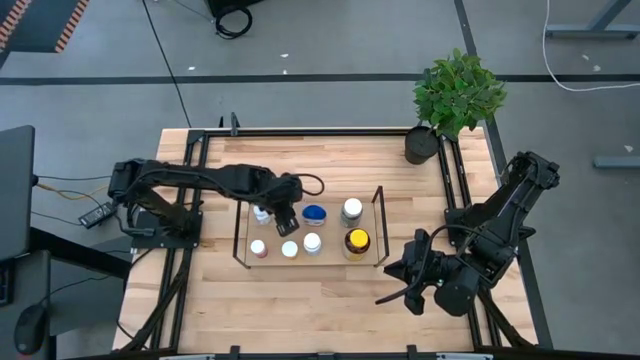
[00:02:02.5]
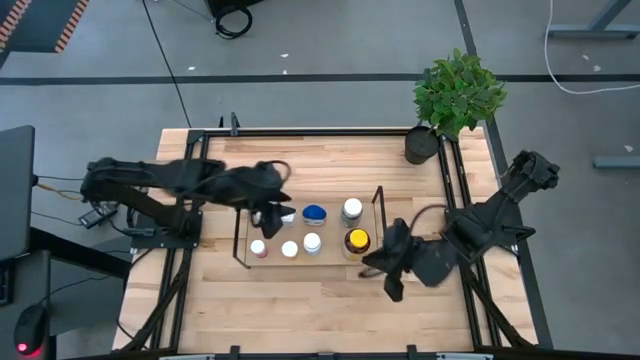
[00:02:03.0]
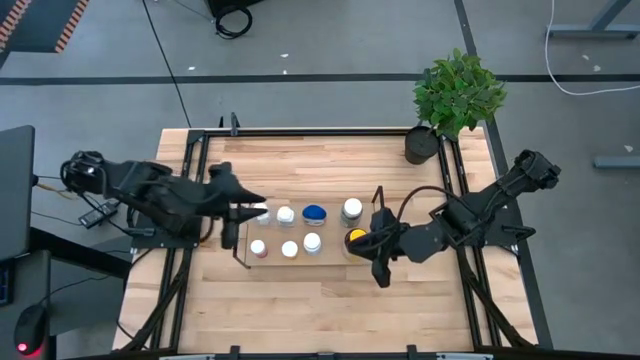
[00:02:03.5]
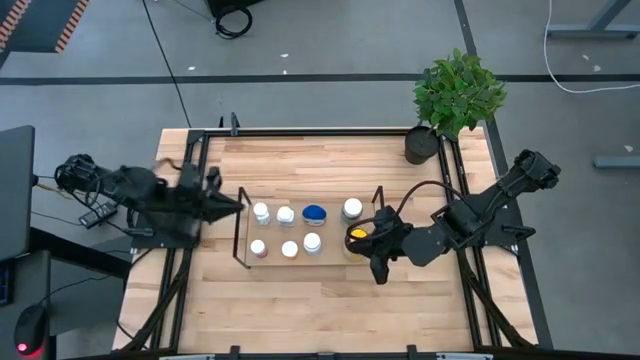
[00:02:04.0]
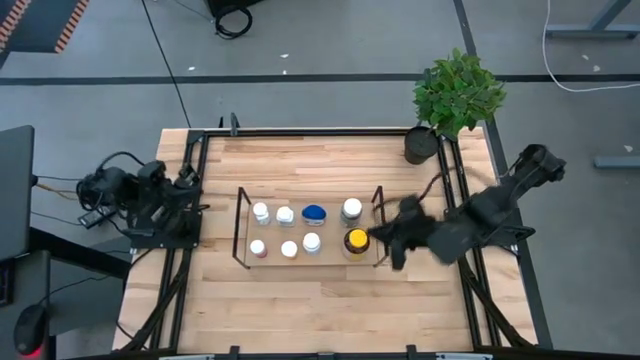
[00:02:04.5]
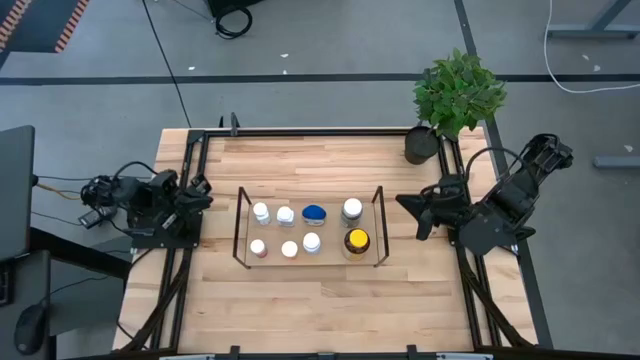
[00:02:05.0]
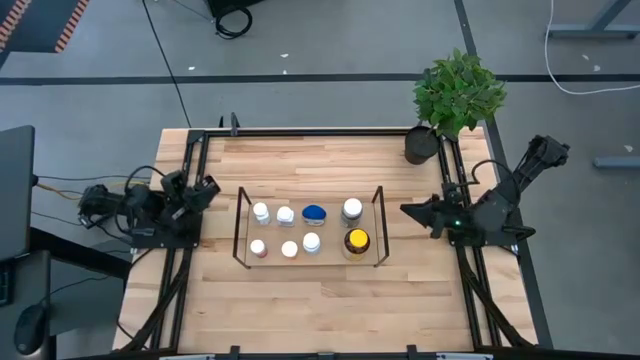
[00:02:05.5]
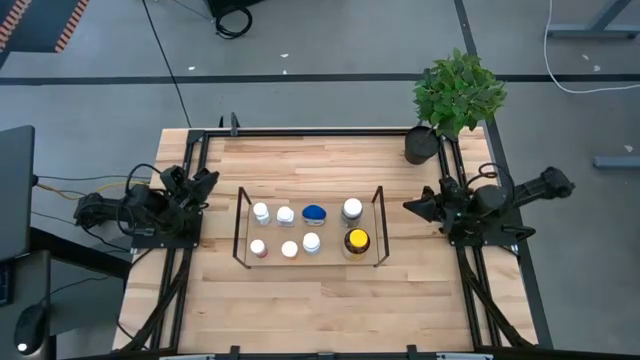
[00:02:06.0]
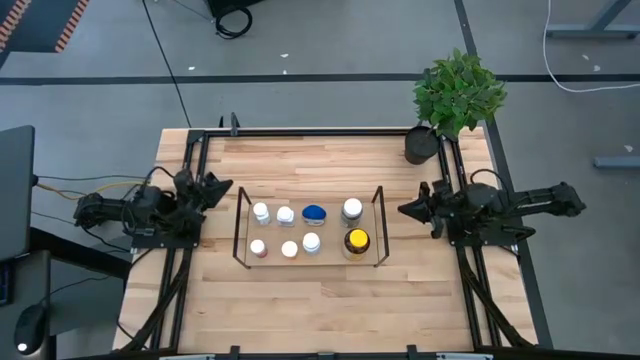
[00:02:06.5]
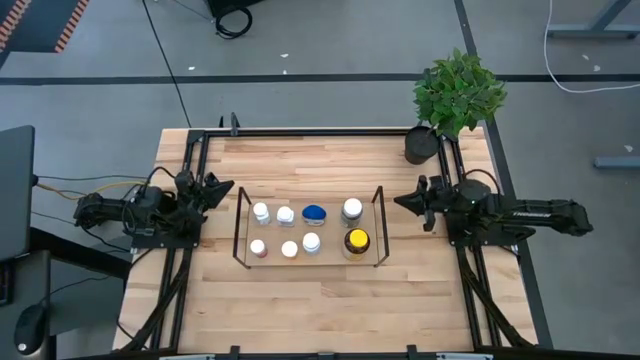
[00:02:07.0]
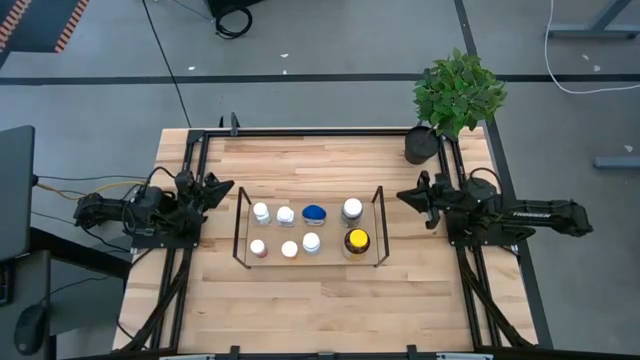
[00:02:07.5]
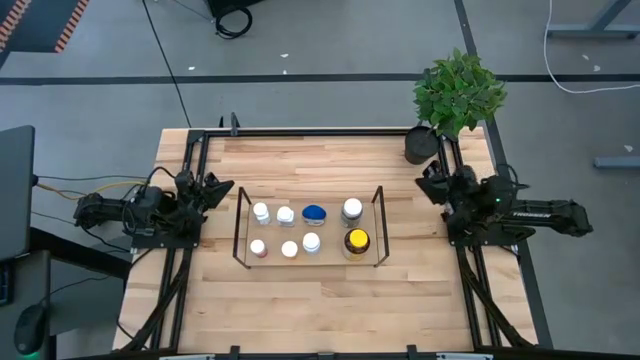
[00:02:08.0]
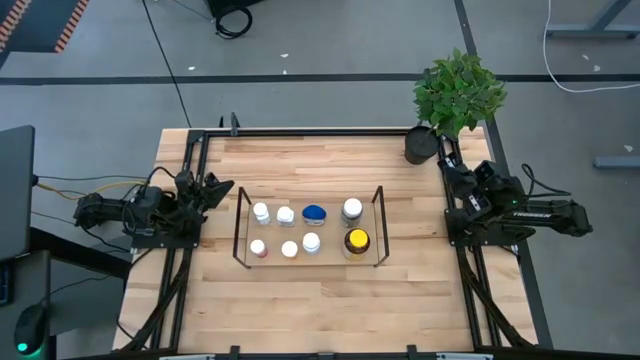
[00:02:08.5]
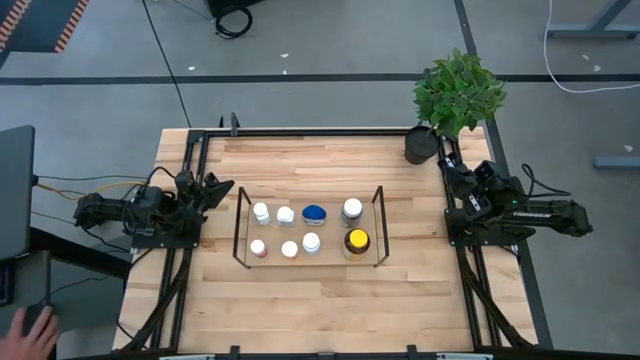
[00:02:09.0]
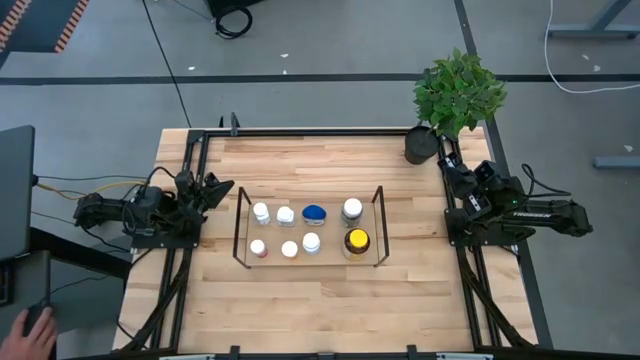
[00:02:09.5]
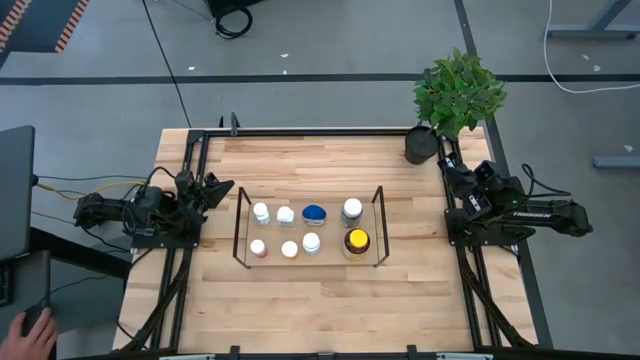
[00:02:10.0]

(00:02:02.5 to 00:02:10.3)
Task: Pick and place medicine bottles onto shelf by color
Return to Home Position

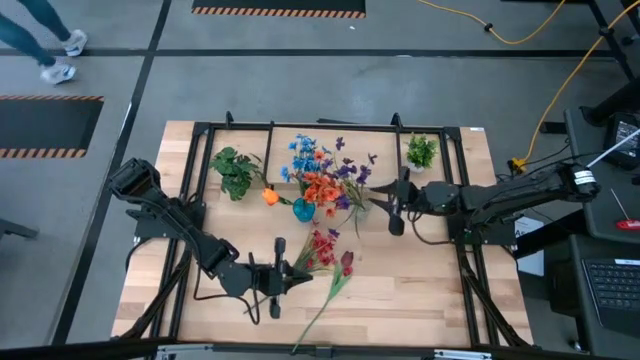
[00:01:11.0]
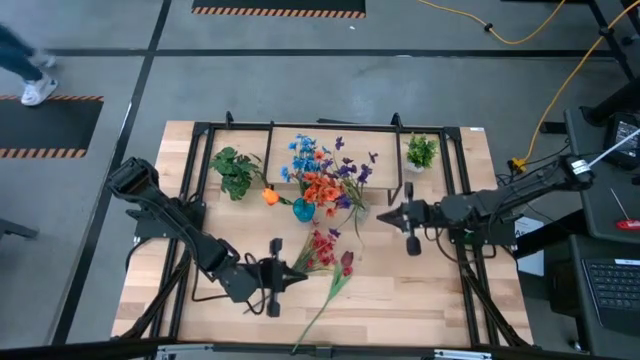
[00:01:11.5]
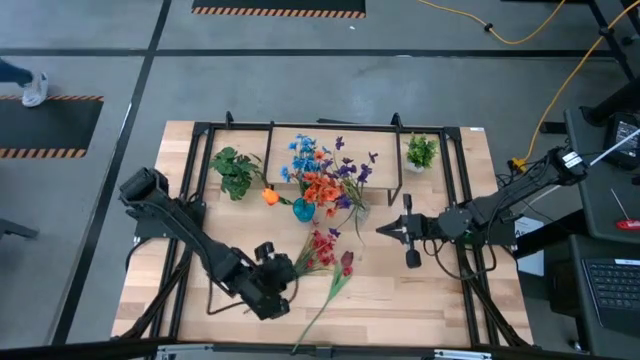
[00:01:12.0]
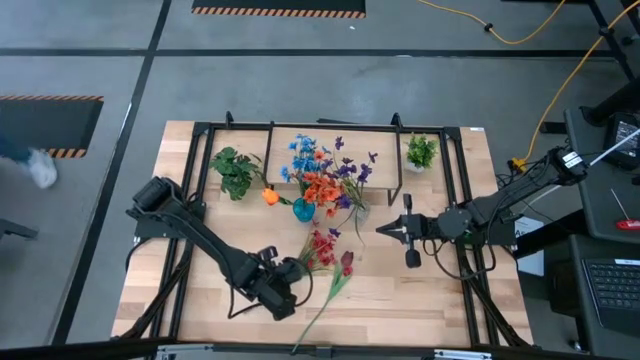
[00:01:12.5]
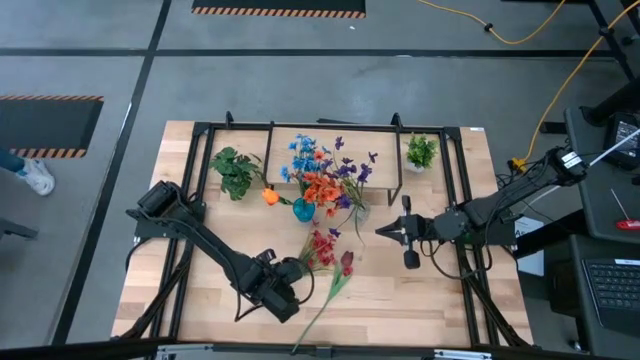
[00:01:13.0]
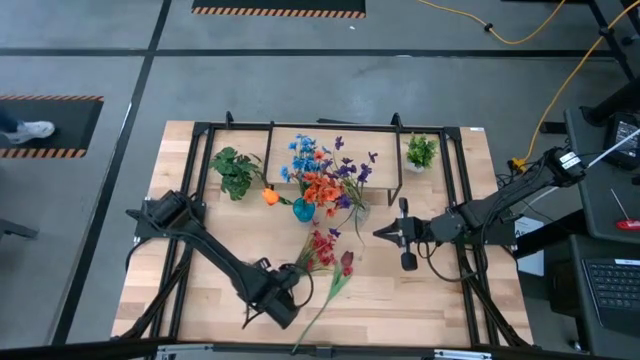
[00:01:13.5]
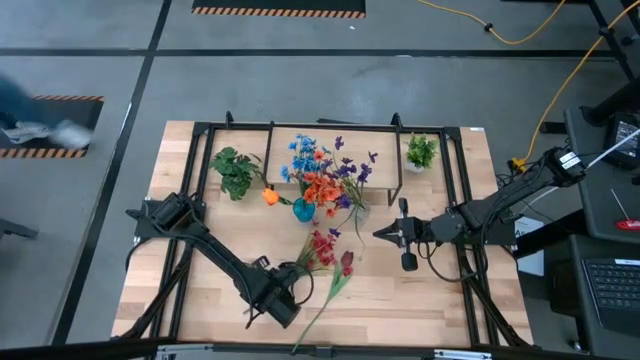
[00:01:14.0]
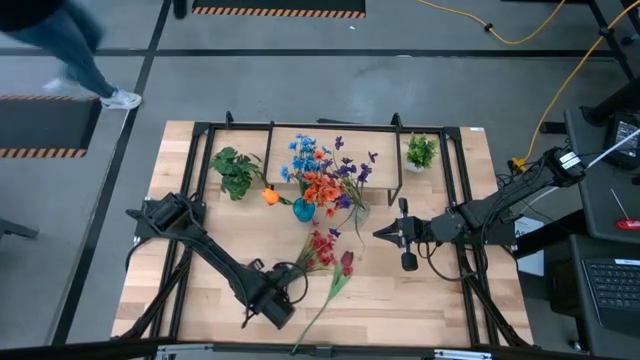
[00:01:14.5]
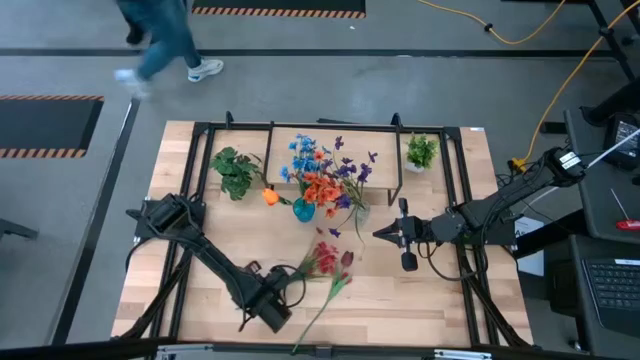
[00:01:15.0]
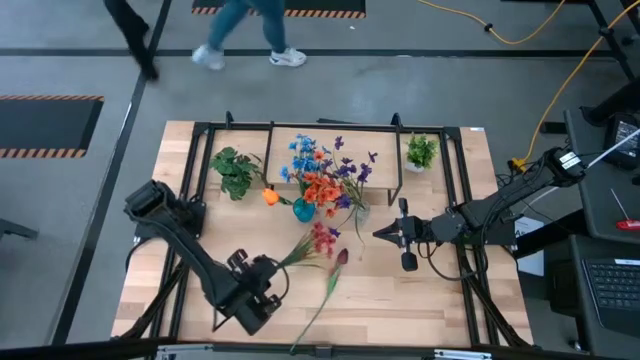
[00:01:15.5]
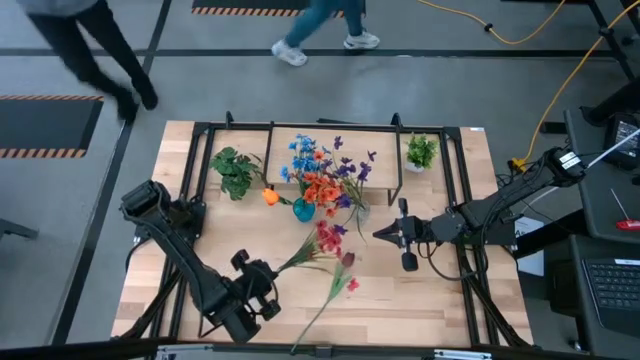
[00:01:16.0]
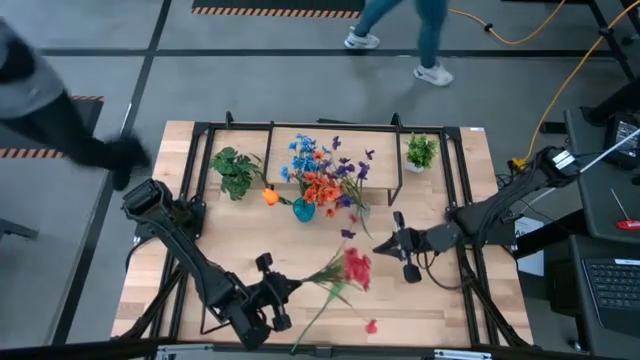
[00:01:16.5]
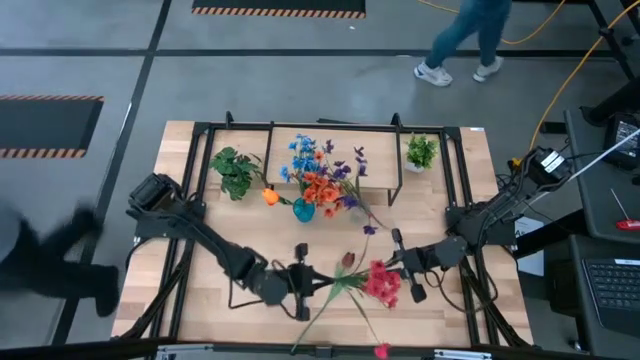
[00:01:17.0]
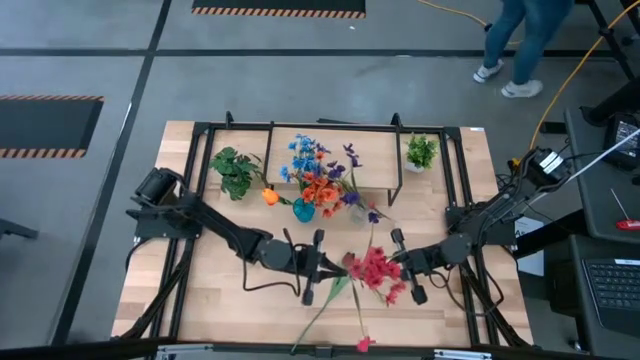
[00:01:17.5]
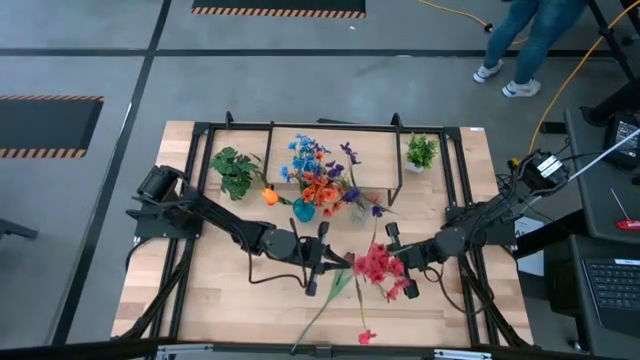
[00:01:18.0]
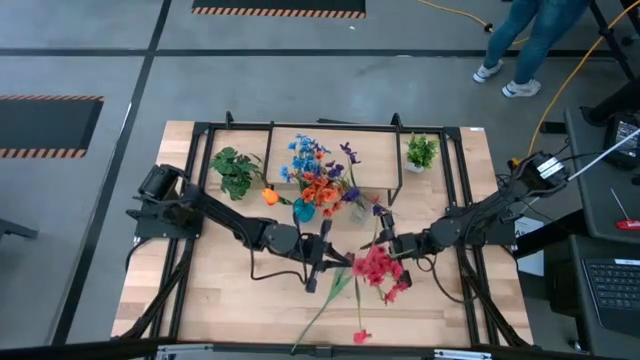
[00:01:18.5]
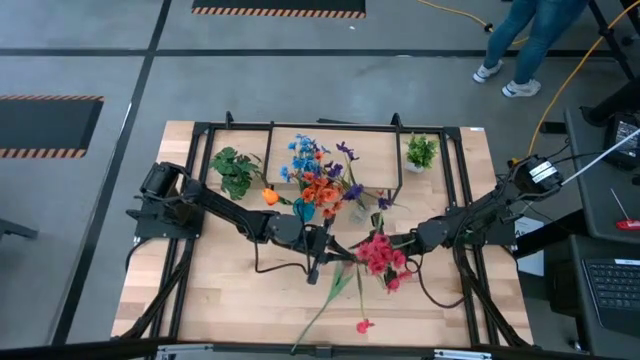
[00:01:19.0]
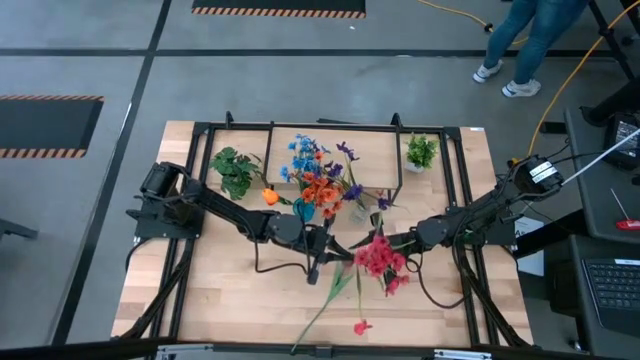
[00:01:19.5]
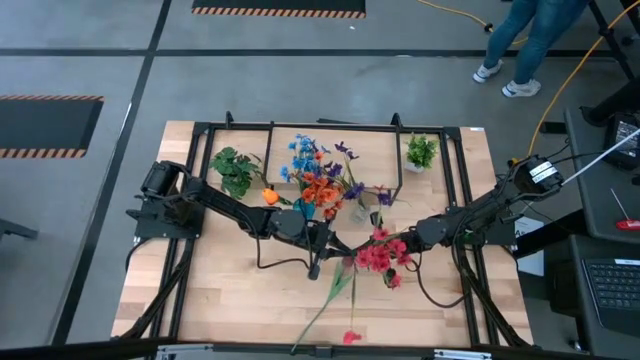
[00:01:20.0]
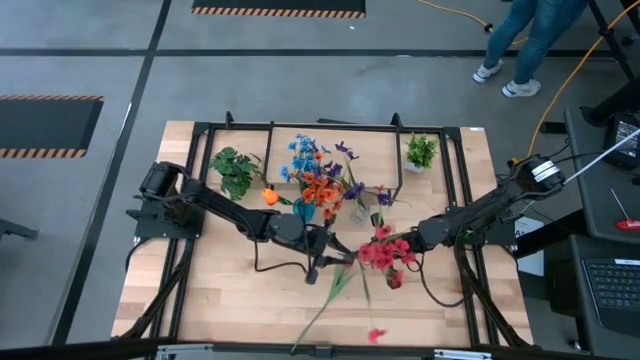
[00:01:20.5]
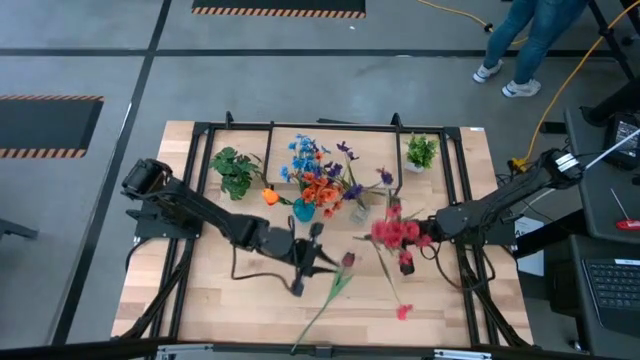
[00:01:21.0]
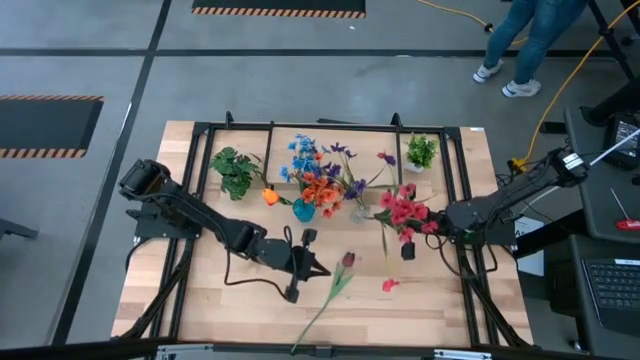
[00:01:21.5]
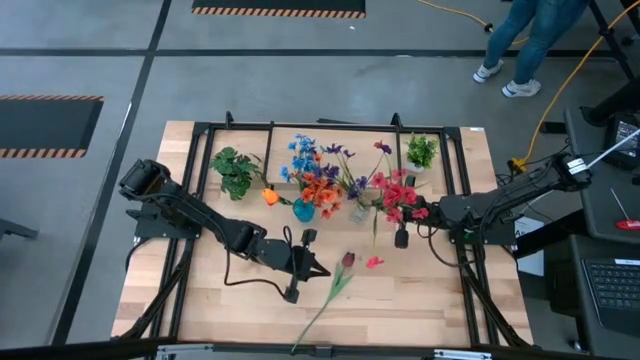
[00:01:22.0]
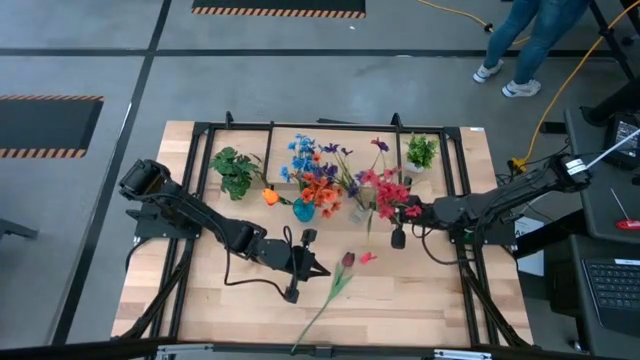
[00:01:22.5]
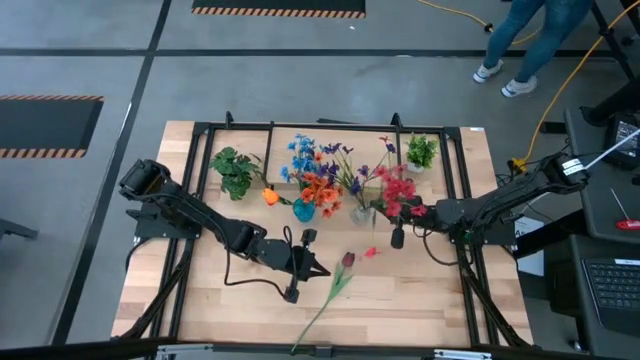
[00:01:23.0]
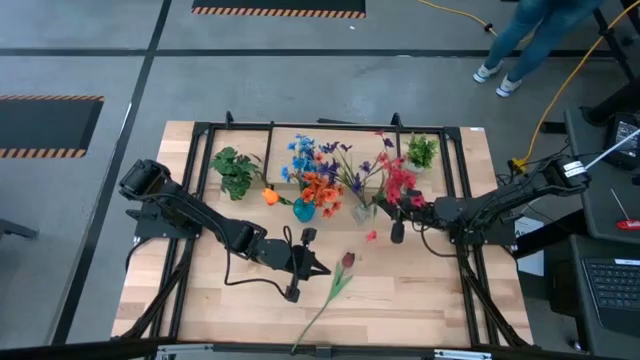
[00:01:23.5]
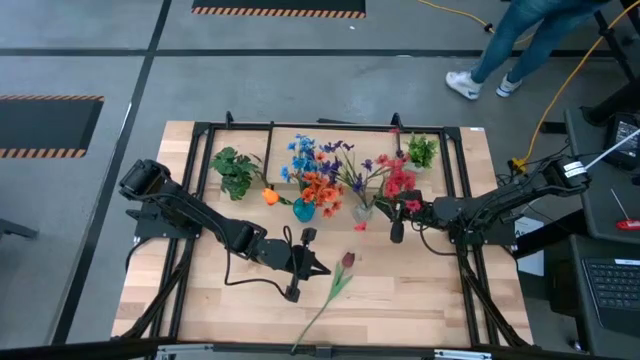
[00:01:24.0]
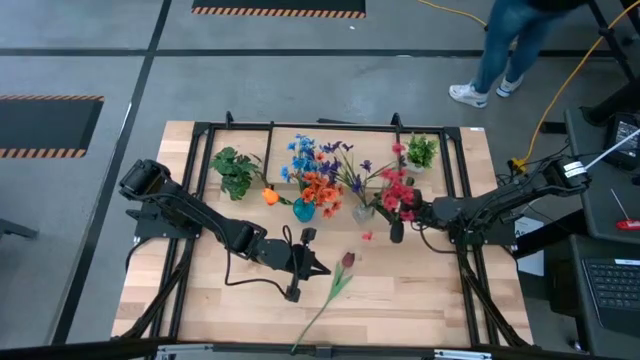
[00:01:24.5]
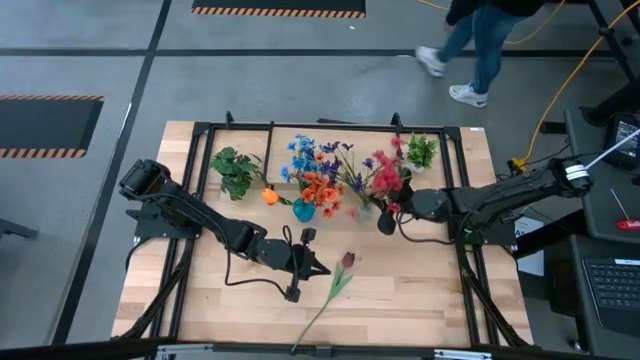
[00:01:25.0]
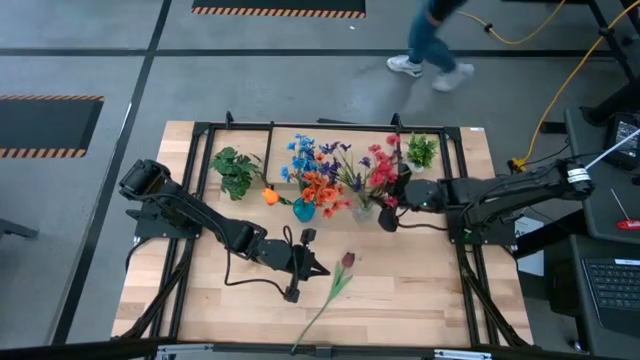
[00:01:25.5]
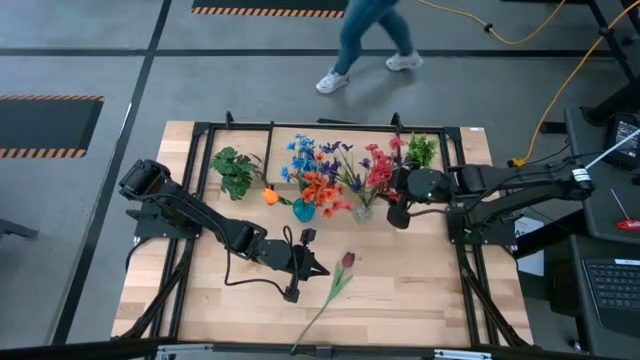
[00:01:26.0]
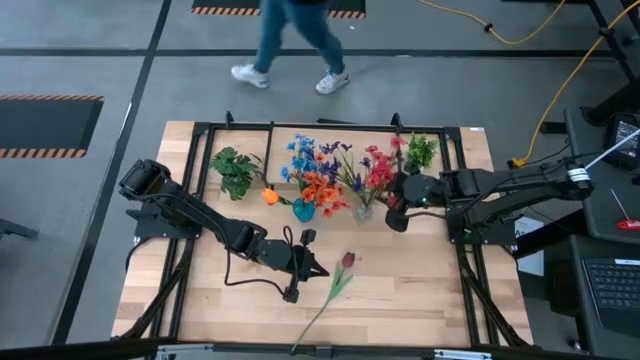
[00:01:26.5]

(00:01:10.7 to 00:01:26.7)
Task: Pick and place flowers into a vace then onto a shelf
Put the red flowers into the transparent vase
